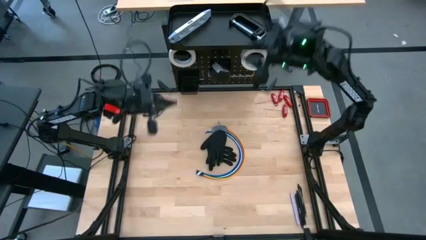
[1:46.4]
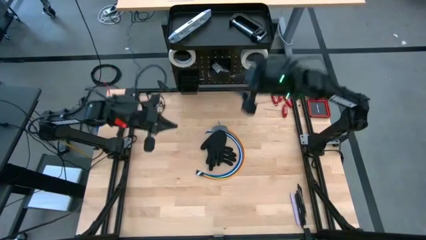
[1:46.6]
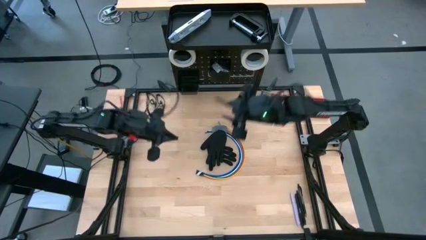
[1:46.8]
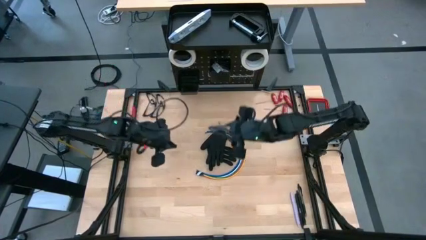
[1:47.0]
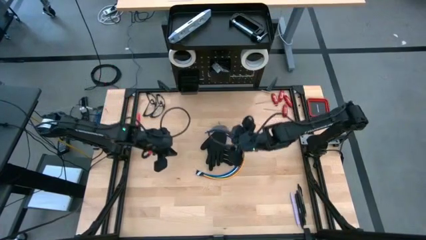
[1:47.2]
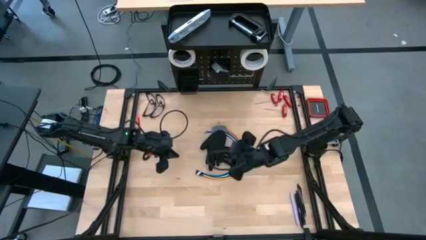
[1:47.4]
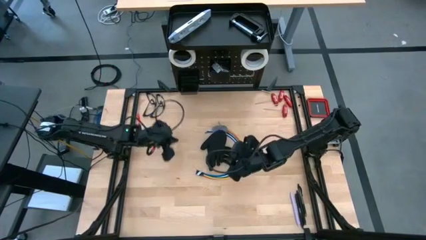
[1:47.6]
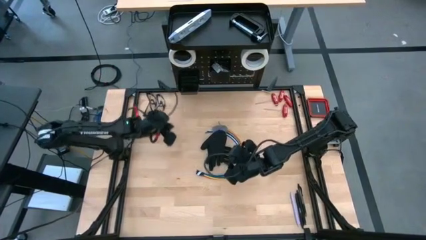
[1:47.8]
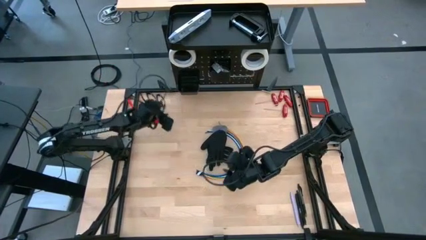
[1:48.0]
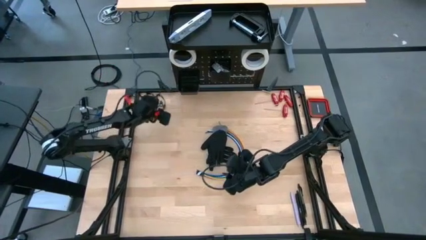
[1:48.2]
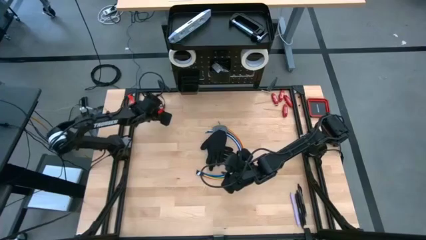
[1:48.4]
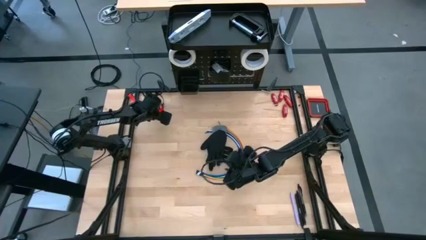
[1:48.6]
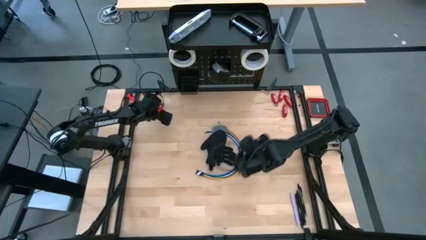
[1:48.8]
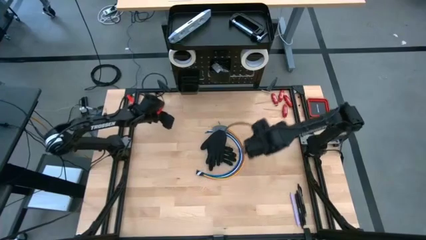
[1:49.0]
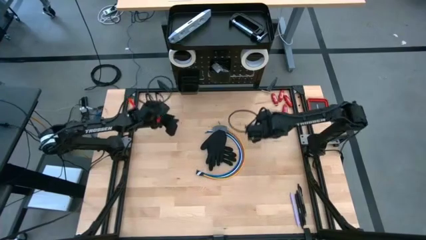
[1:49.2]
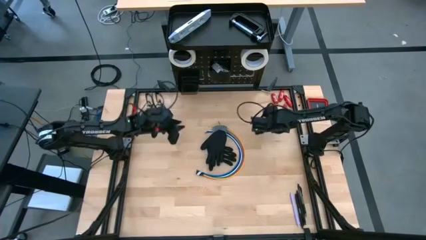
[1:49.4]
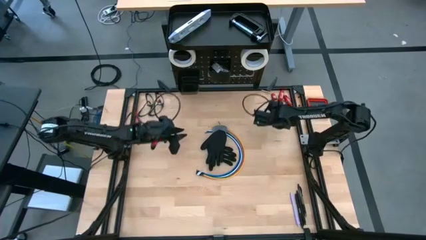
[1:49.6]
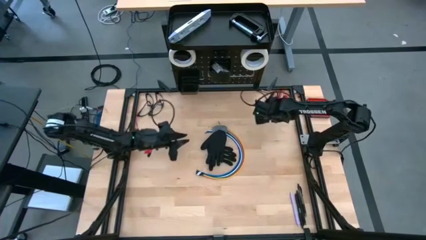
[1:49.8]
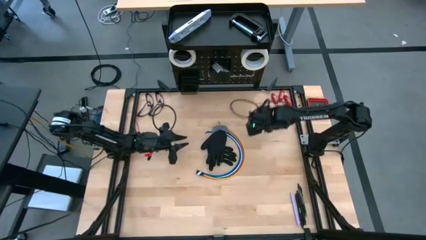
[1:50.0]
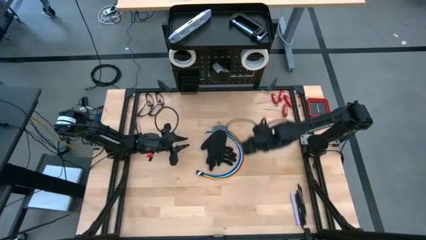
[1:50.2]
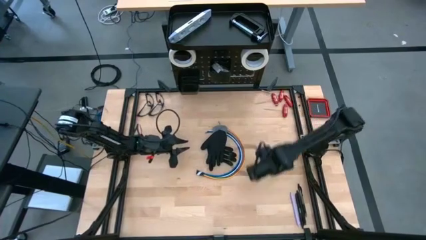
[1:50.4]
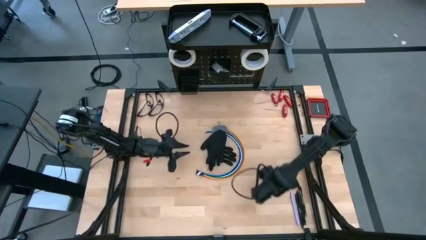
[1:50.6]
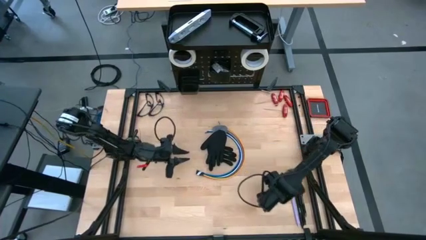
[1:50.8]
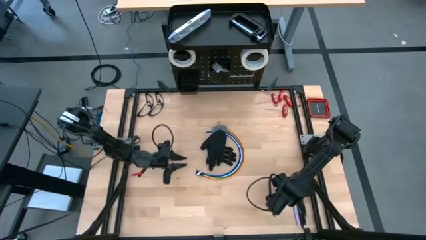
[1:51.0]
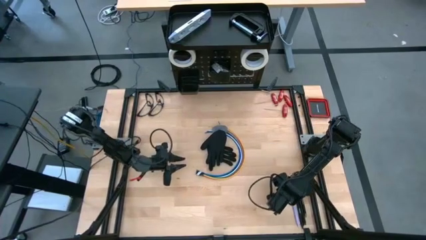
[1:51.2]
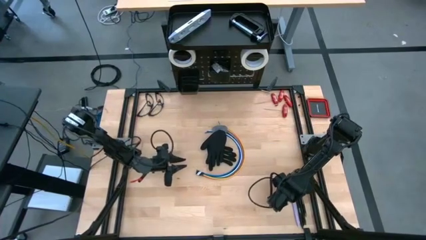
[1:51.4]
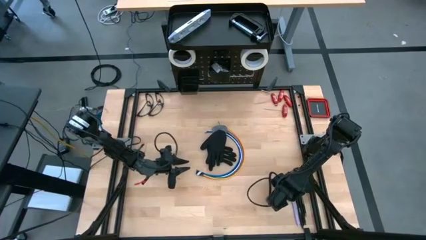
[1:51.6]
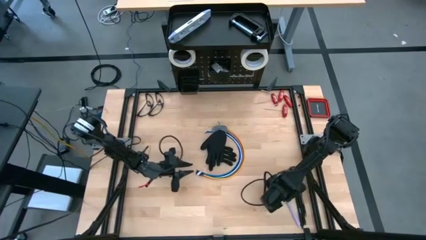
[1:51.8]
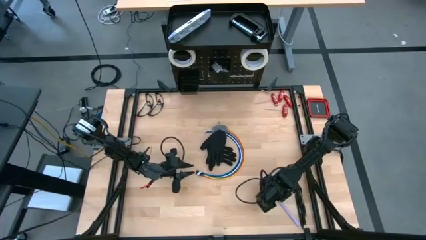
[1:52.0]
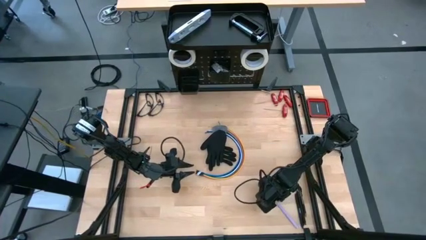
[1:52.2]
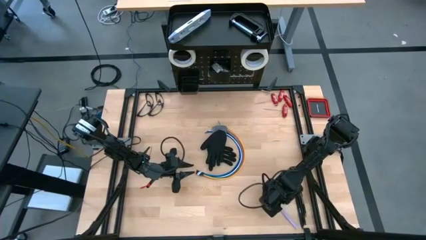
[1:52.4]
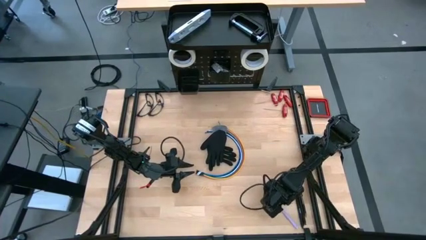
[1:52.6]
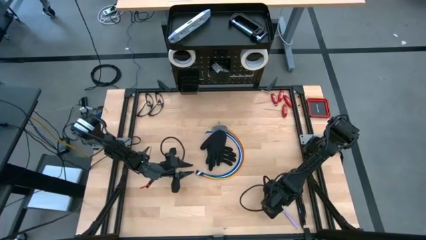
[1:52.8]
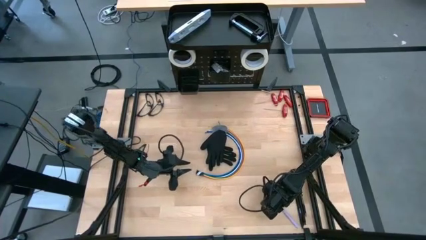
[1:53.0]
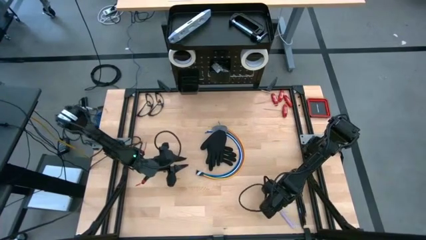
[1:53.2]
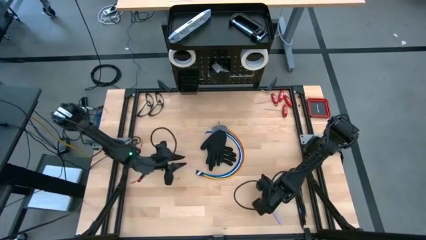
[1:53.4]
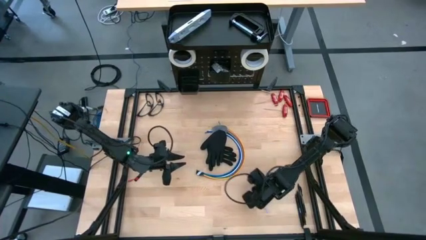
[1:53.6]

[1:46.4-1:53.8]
Task: Hang tools onto peg board
Put the purple pen into the black bin on the peg board

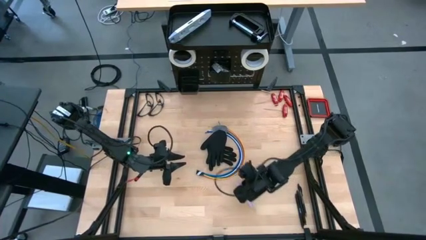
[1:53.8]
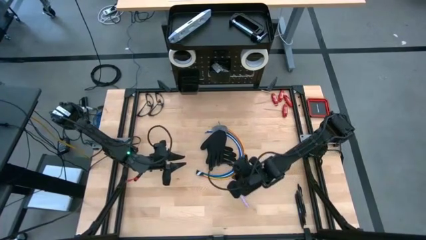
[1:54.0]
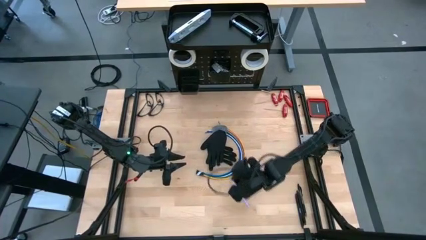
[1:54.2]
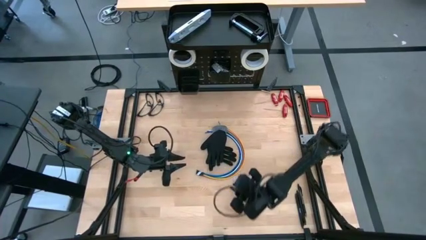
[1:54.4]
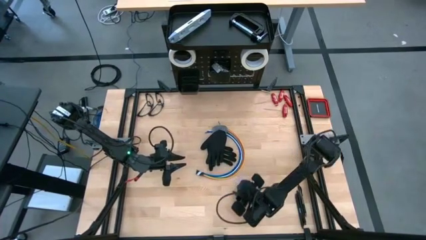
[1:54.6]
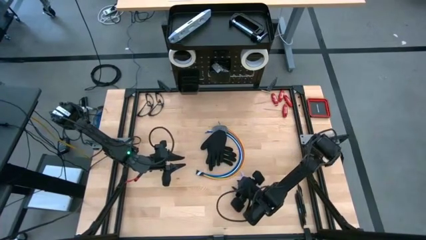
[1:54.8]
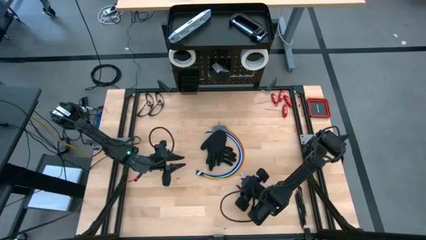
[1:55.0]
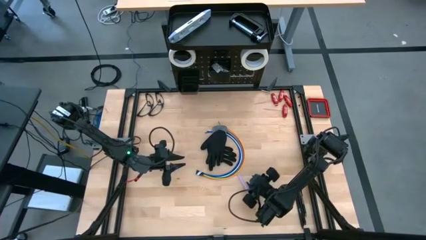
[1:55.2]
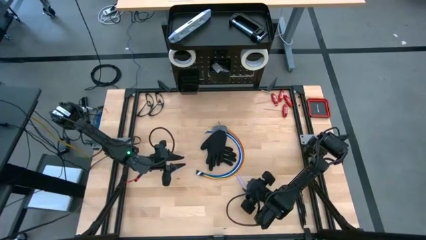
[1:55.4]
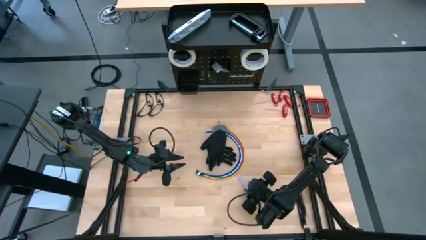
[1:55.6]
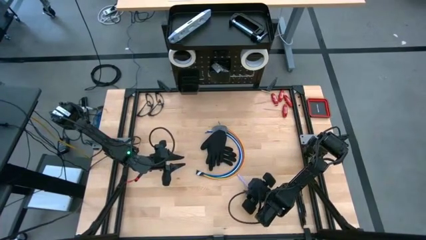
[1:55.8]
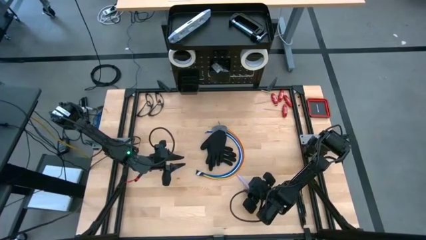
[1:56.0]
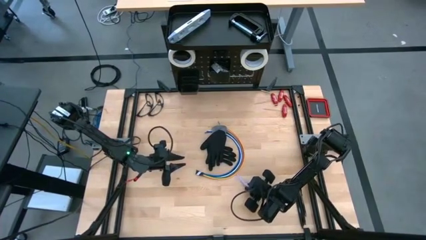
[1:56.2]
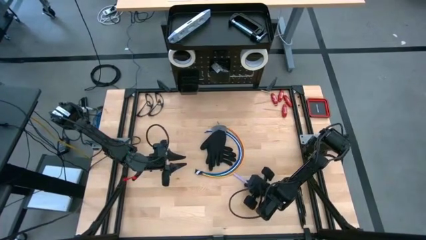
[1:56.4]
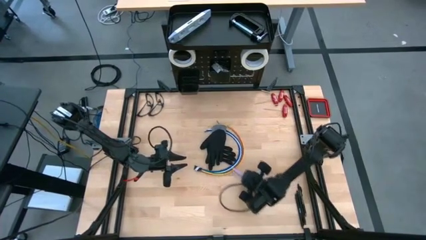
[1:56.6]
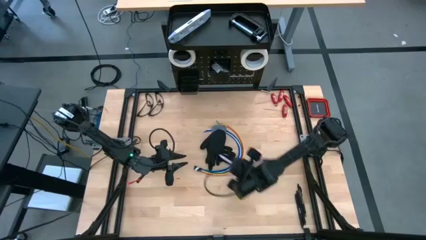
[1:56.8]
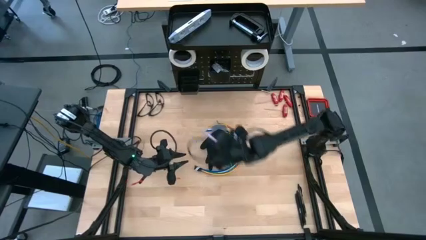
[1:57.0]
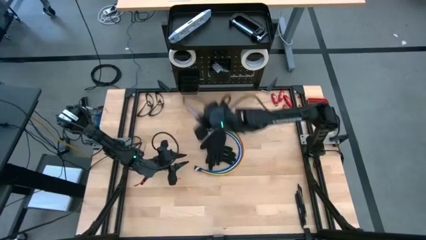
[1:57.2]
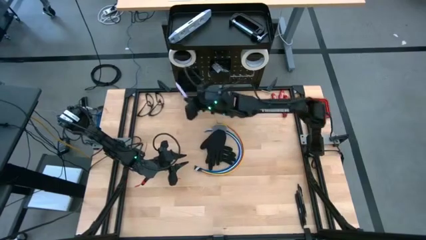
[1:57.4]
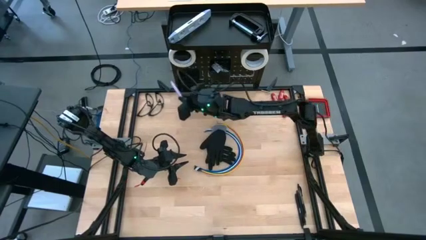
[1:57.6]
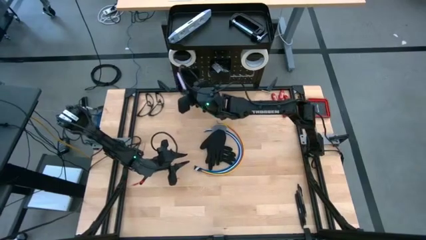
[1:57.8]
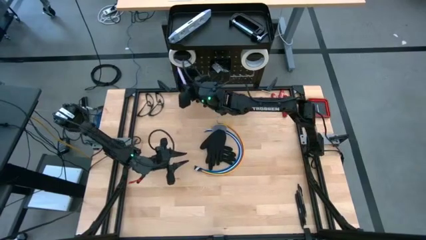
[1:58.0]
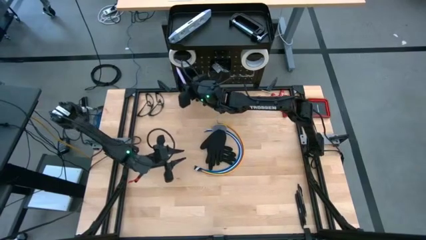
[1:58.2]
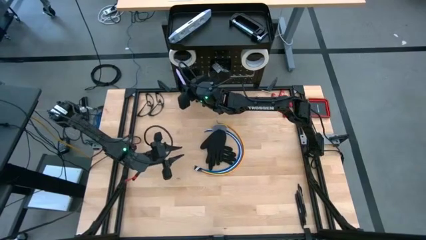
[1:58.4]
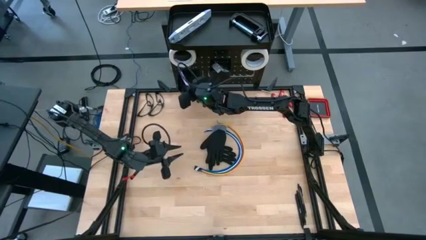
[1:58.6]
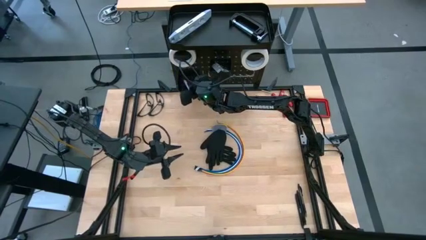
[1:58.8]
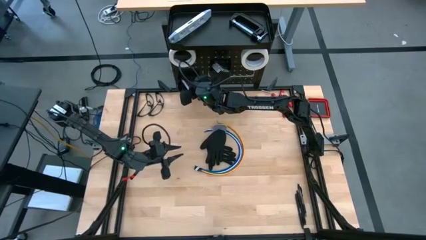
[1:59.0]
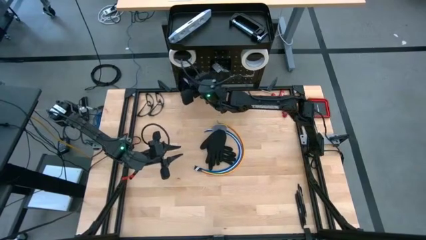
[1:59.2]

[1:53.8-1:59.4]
Put the purple pen into the black bin on the peg board

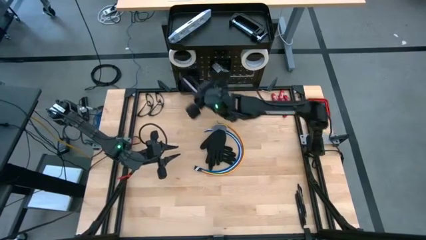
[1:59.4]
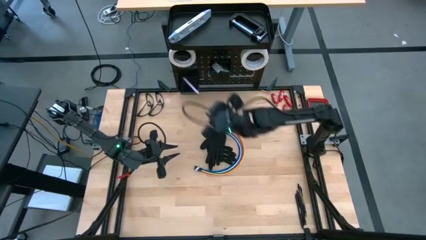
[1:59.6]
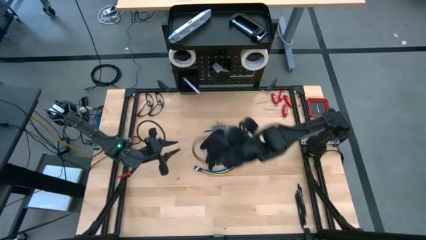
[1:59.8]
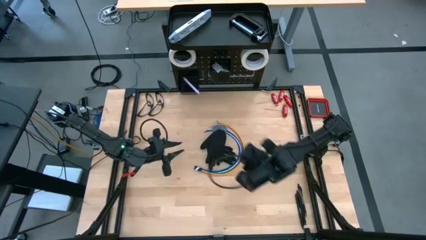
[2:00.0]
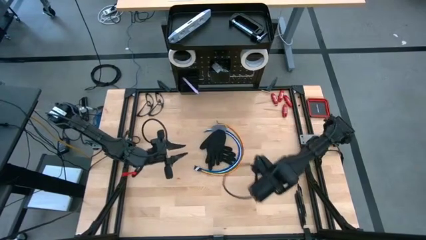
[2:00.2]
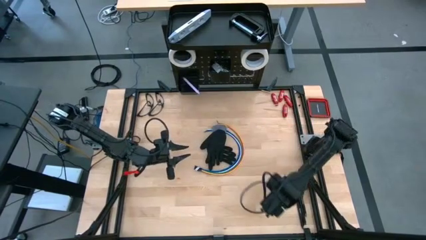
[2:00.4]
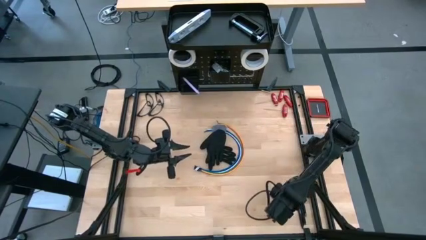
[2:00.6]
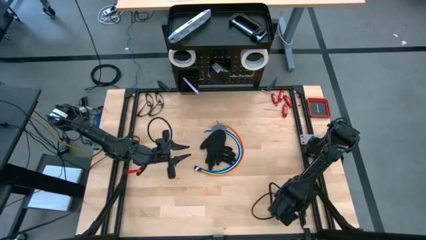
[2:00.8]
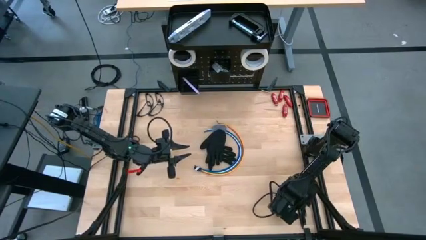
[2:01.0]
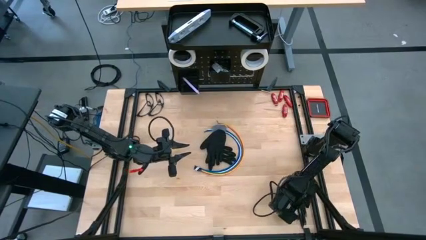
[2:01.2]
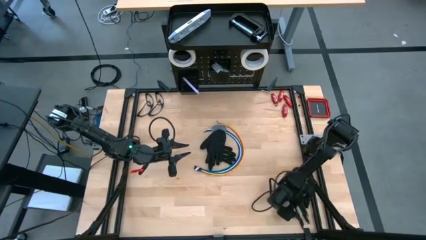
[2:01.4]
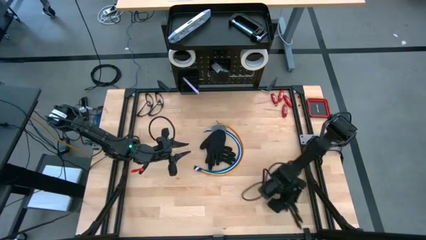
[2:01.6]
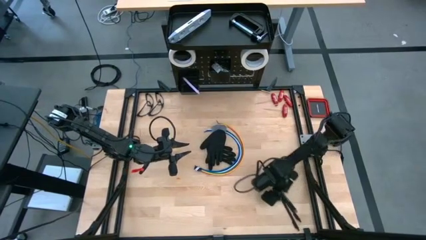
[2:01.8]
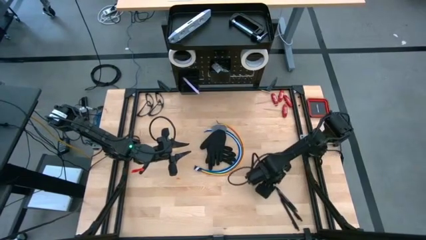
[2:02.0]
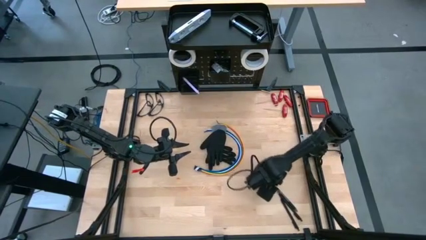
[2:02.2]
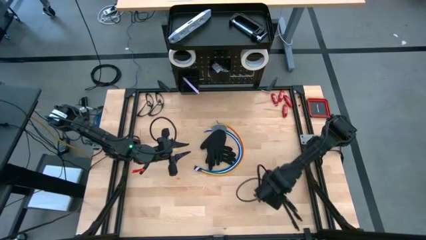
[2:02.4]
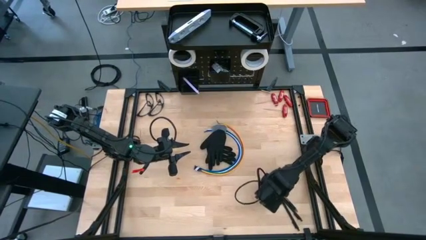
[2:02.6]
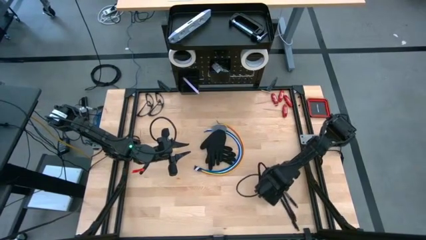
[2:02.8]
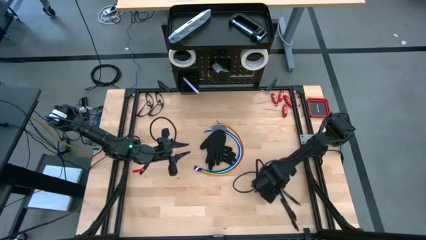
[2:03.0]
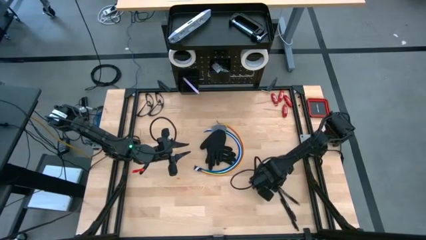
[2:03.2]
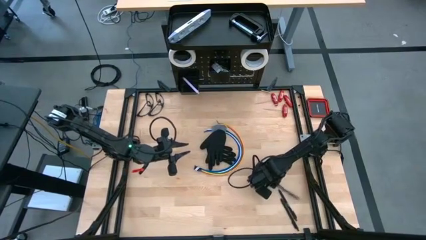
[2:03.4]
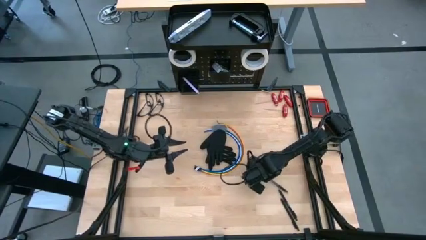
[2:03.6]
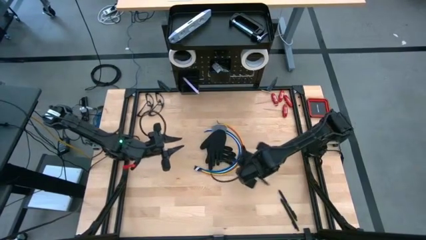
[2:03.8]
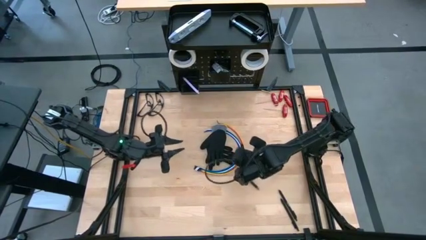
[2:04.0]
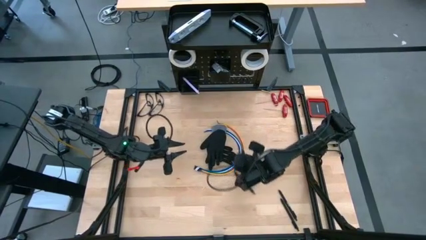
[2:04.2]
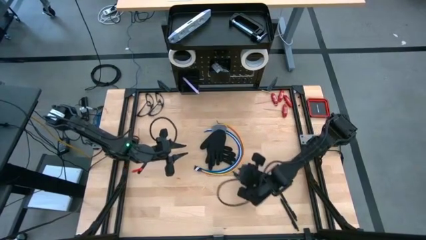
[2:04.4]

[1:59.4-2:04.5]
Put the black pen into the black bin on the peg board
